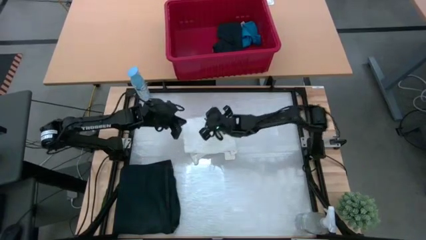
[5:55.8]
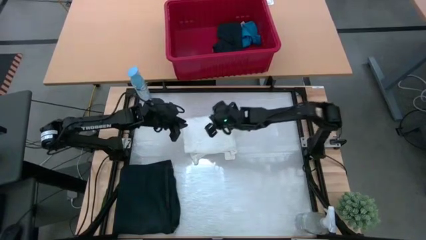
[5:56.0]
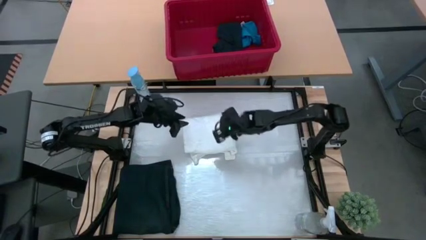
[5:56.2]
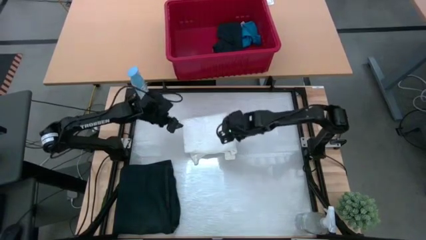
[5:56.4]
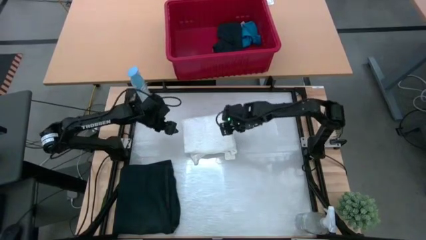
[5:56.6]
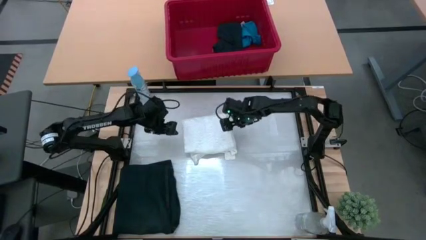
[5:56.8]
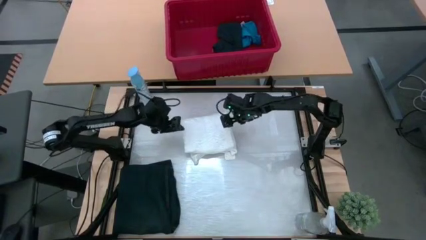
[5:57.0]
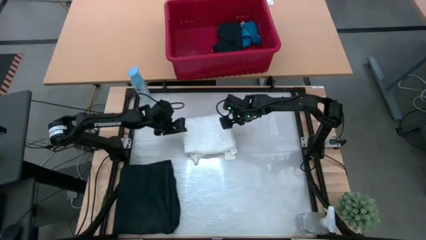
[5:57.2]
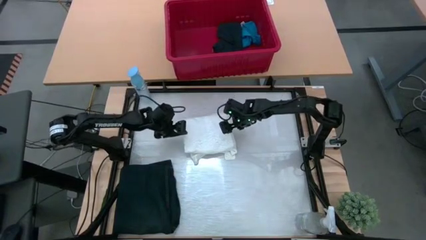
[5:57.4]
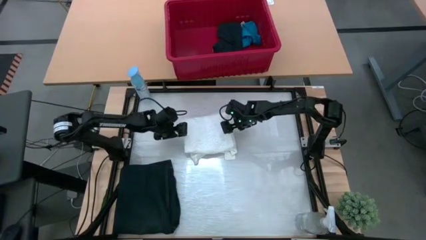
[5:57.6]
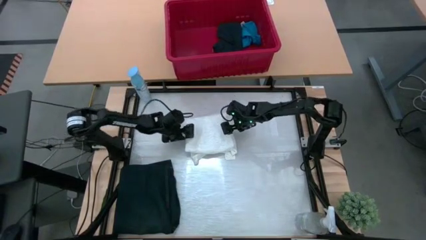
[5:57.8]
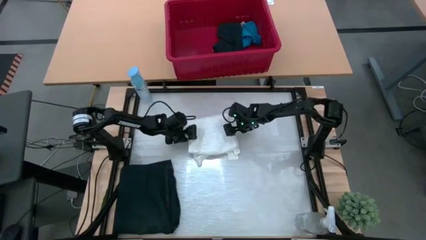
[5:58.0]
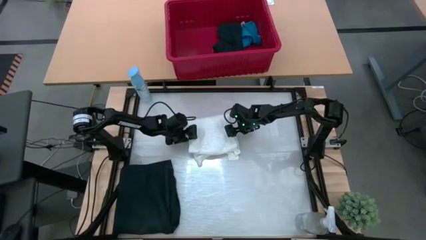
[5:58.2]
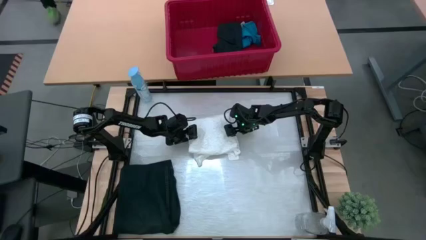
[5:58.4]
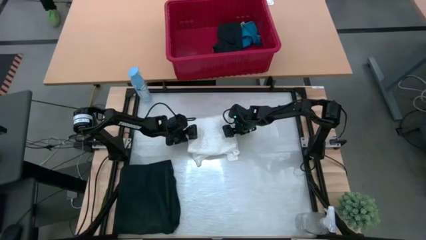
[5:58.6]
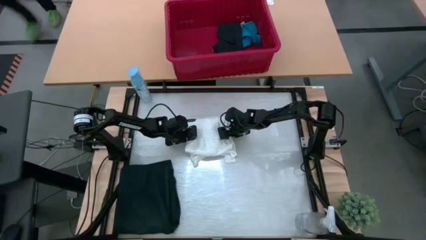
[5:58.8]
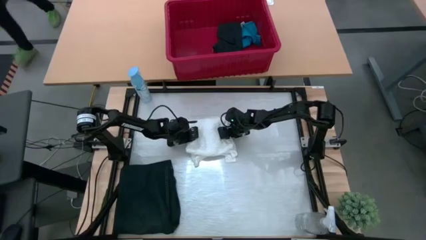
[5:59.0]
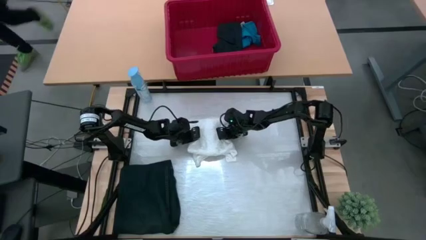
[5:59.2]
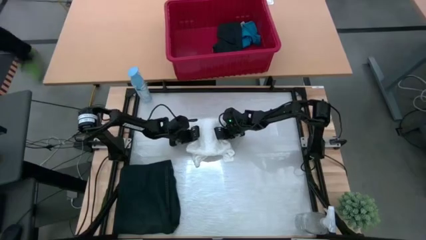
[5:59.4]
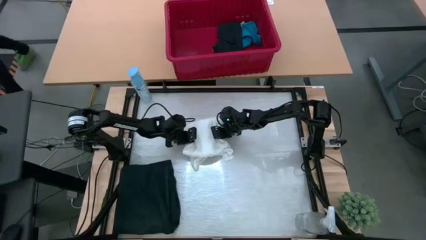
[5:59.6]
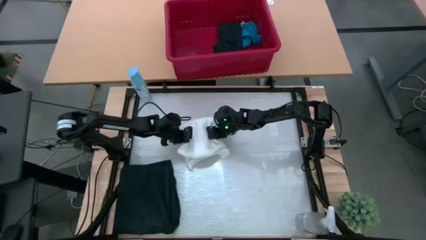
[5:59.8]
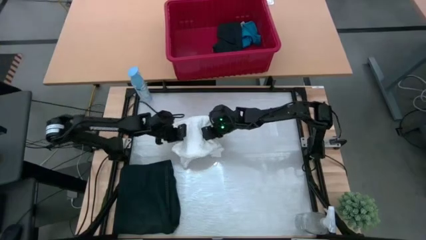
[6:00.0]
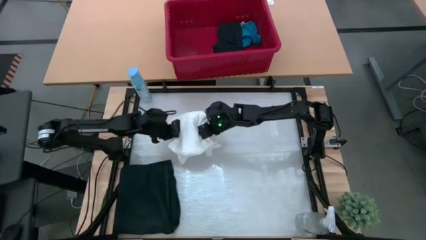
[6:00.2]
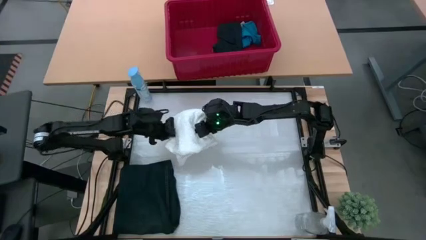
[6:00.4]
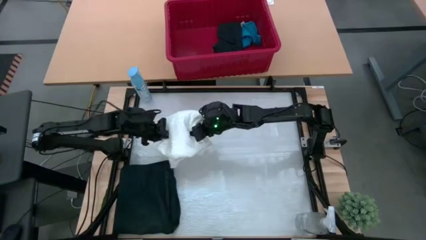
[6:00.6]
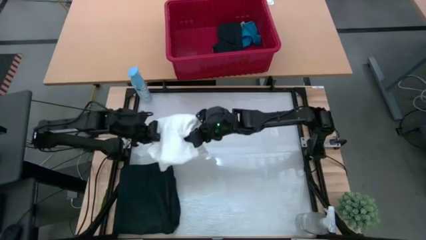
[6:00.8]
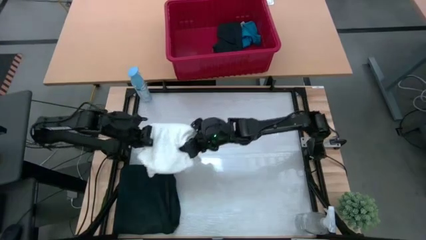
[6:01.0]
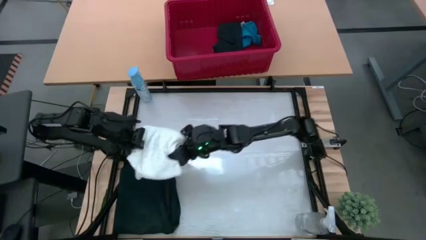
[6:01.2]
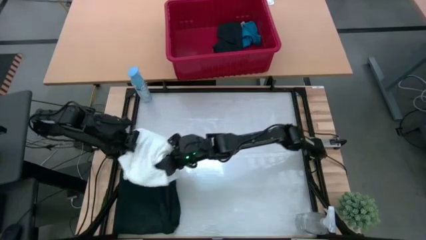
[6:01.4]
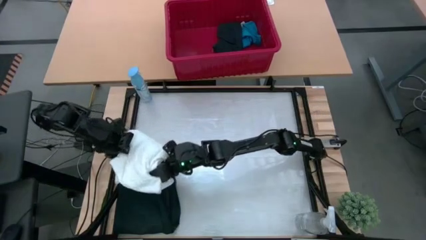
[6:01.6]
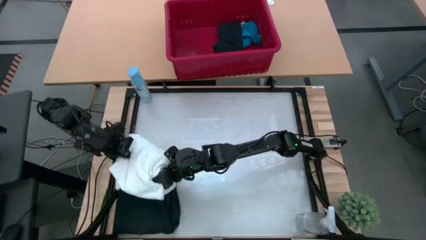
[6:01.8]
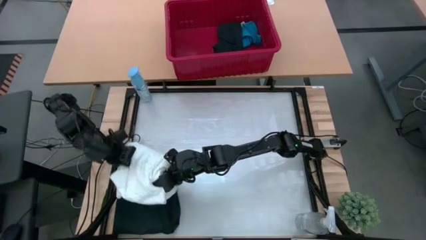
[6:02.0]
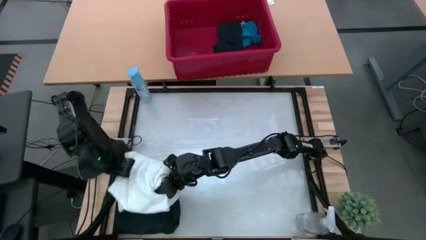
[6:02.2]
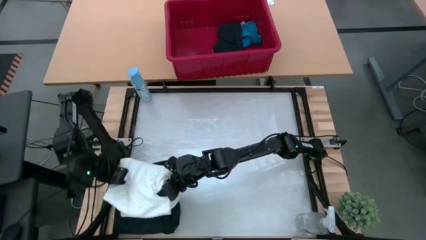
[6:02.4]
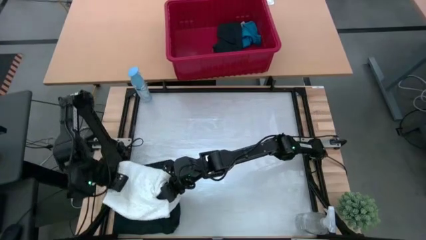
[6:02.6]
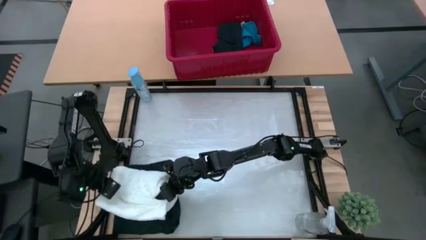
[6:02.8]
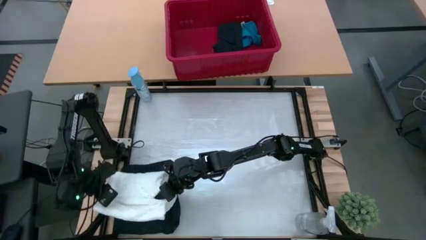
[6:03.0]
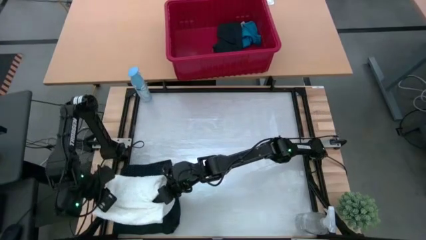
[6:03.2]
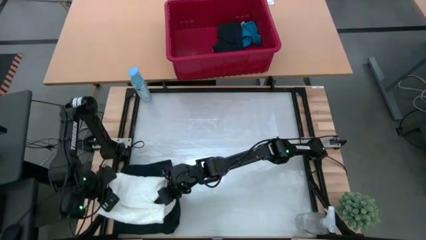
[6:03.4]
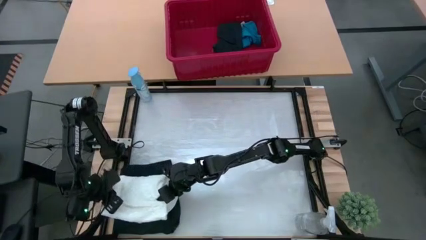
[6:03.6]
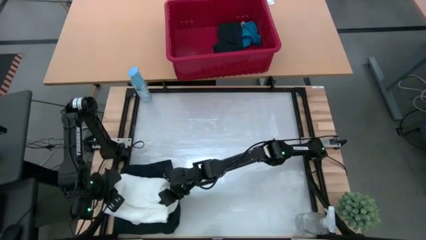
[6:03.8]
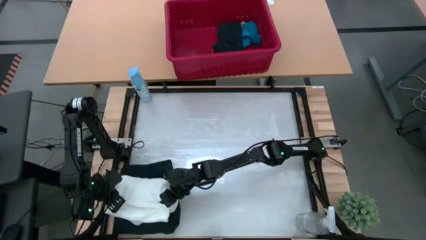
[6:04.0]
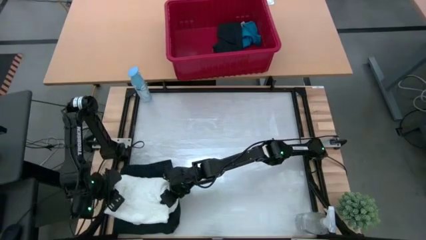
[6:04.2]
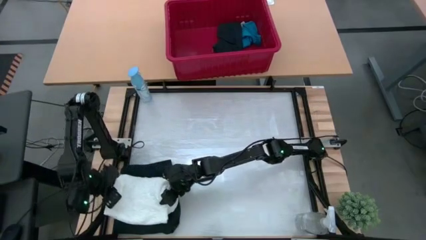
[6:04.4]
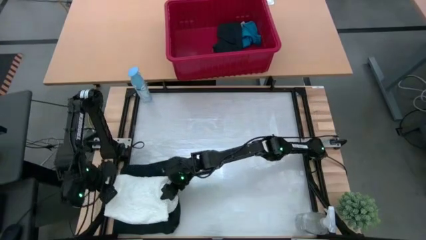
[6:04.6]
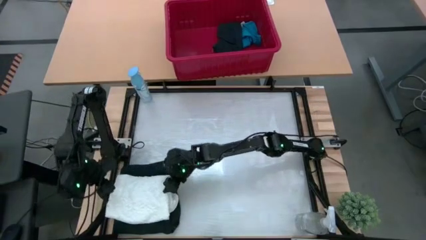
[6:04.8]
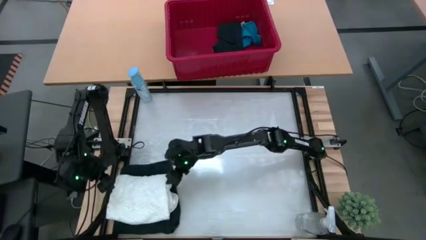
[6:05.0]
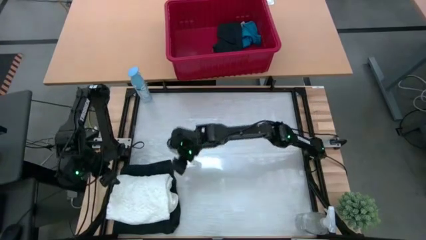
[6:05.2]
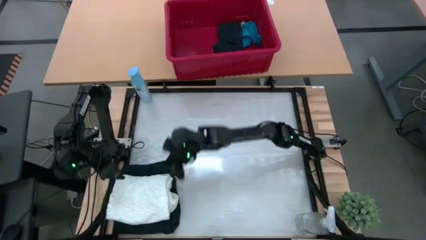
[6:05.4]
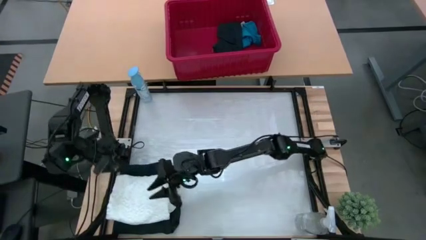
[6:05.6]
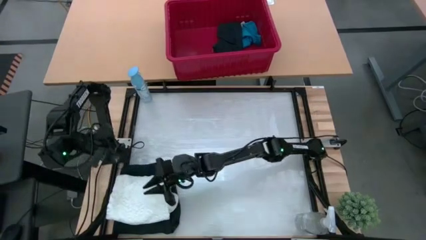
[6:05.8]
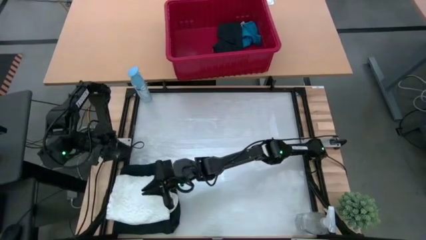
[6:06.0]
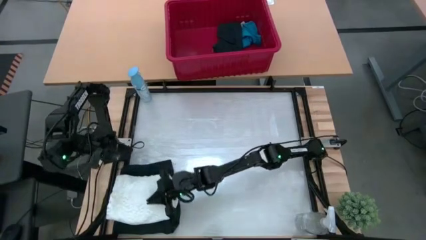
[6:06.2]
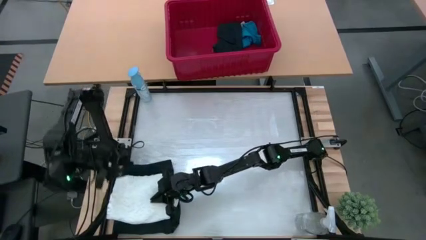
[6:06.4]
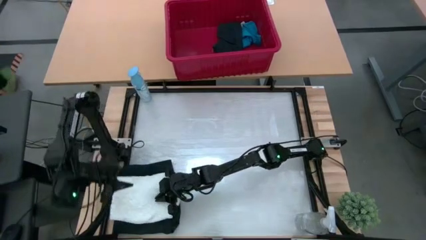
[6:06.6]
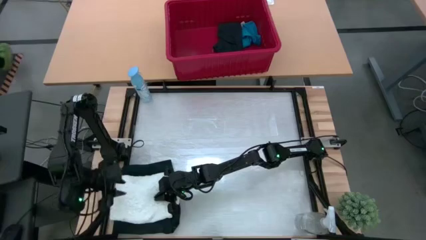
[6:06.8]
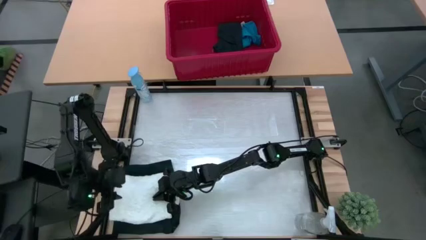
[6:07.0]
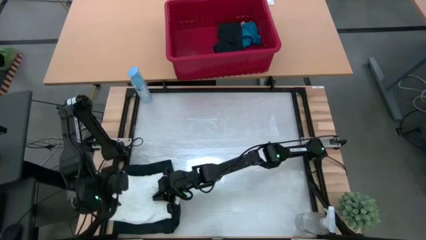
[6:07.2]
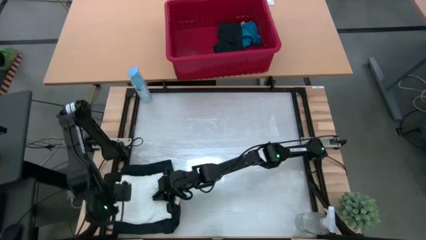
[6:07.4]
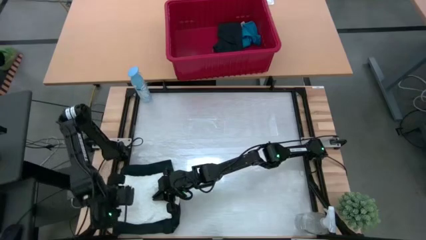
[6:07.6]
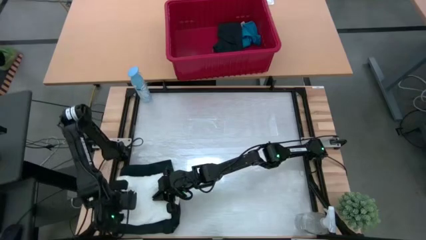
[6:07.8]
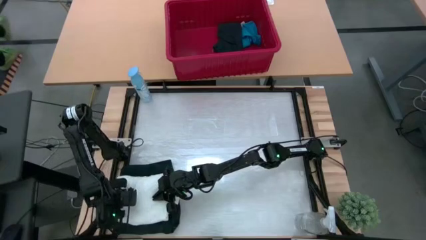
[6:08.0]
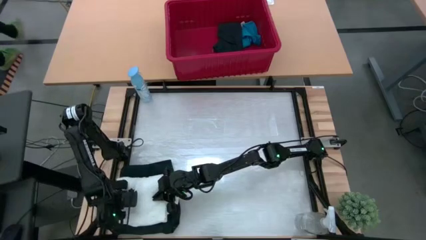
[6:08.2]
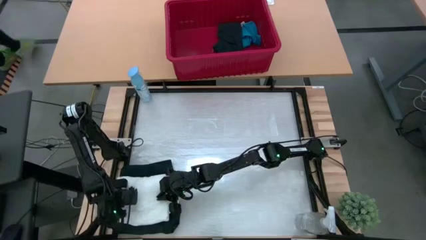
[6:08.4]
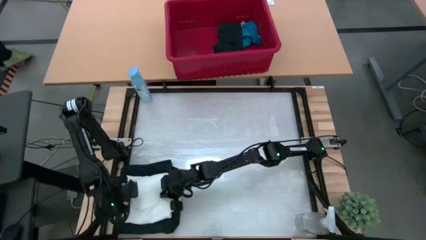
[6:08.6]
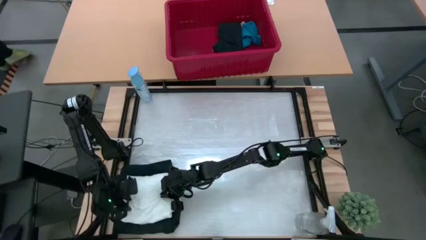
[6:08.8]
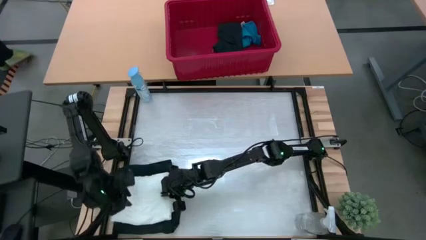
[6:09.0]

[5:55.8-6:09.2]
Task: Fold Laundry from Bin
Stack the white shirt on top of the black pants

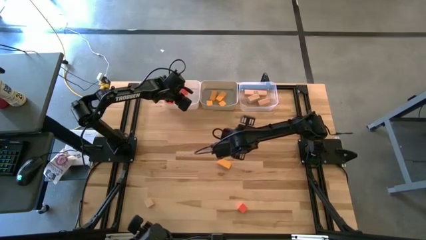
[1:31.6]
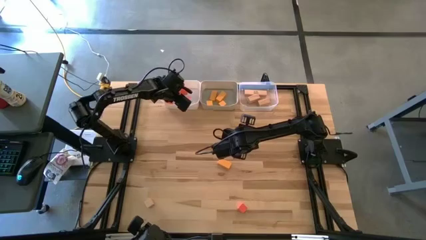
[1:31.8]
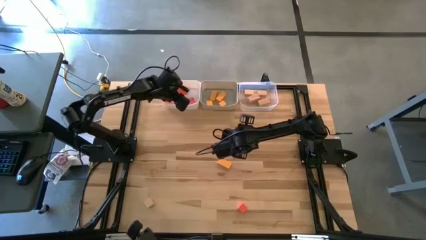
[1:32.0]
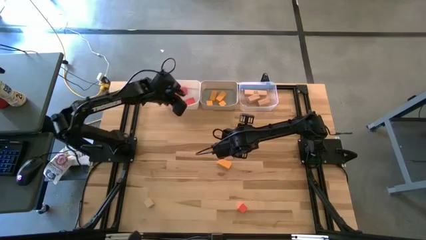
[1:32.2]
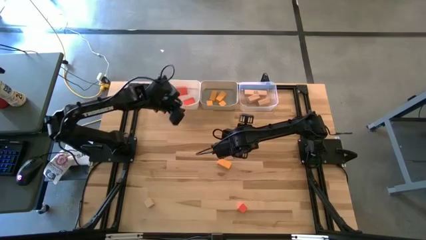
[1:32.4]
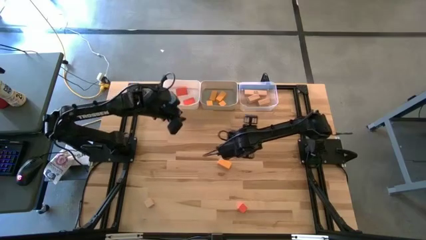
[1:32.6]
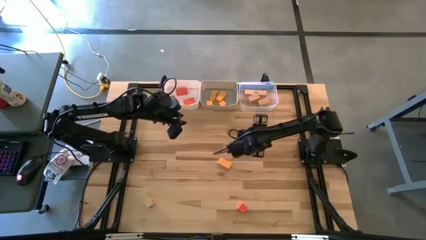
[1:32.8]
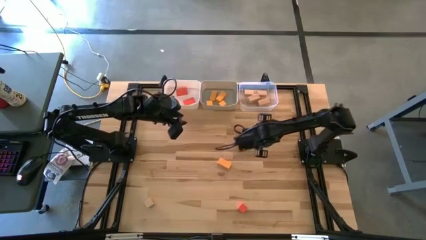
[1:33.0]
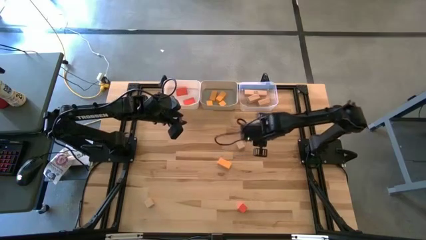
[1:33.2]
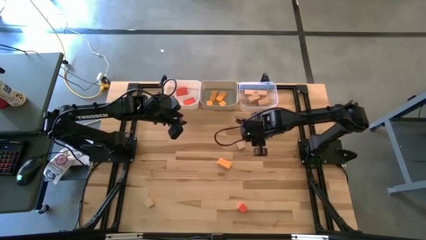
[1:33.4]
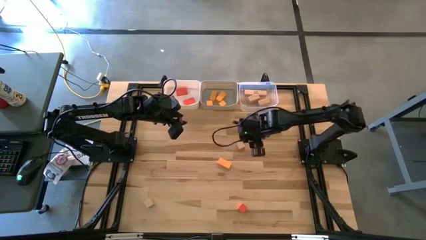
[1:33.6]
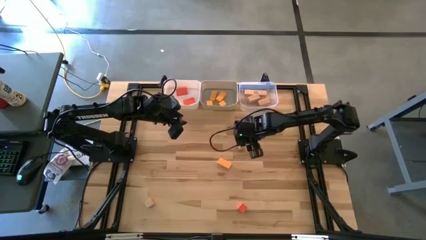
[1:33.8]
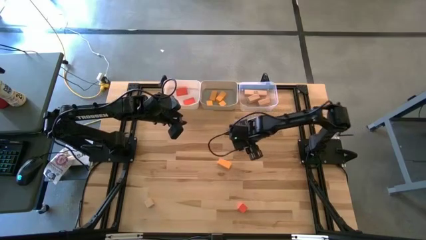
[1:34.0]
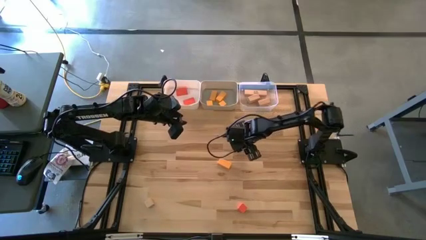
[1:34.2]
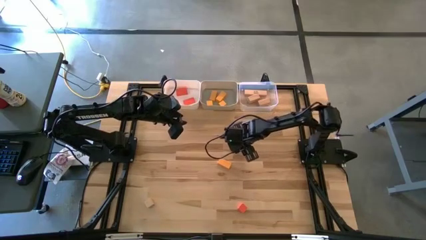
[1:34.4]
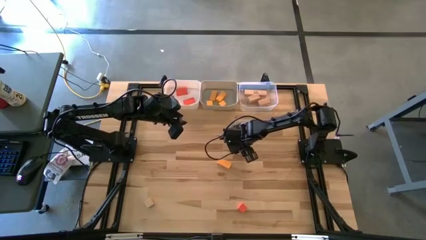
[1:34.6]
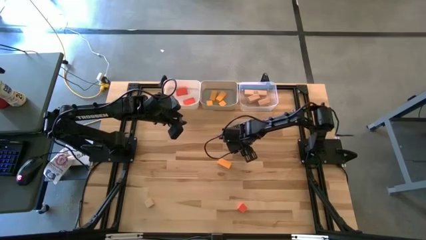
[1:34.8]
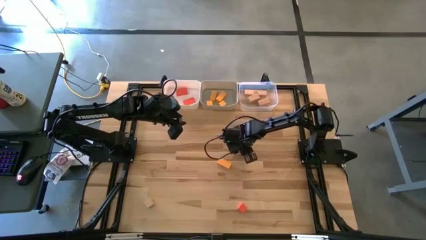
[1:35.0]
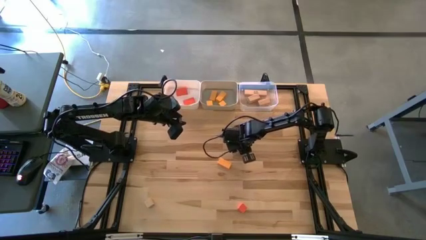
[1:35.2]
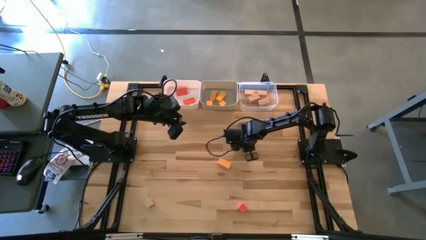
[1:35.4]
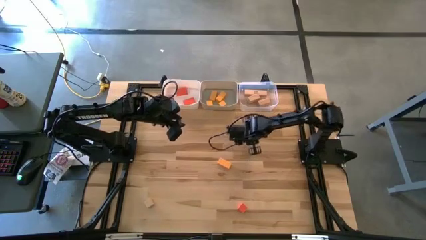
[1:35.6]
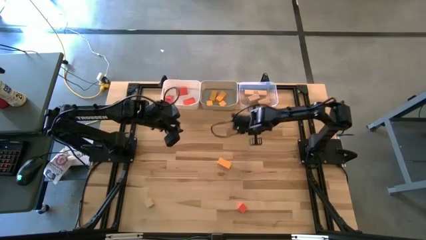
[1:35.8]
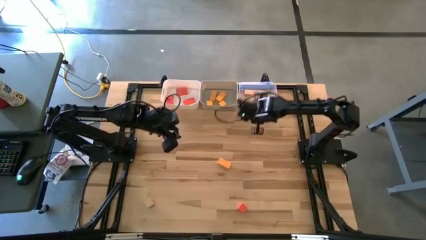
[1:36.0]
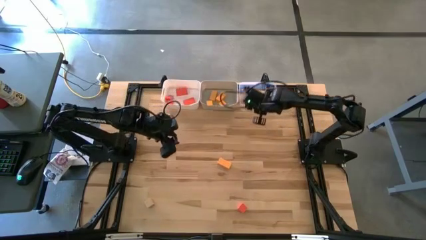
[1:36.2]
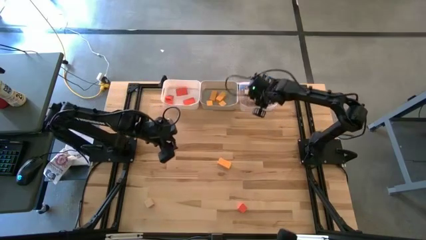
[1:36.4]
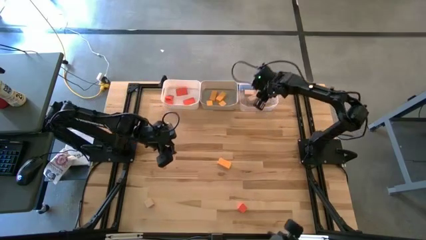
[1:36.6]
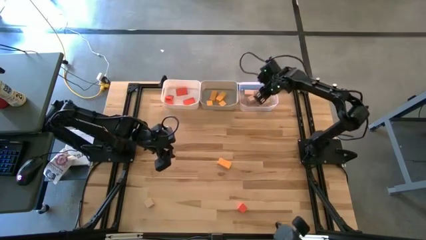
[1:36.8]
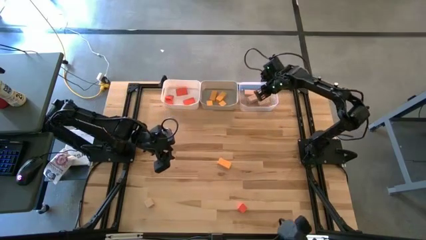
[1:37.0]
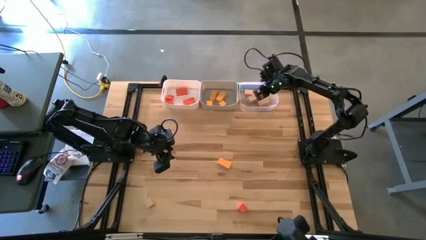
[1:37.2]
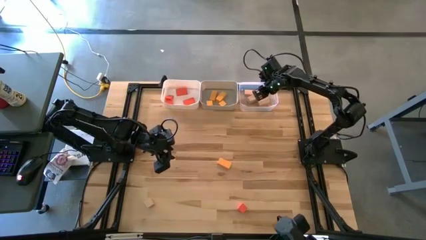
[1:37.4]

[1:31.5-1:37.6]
Task: Sort & place blocks by color
Put the brown block into the transparent bin
